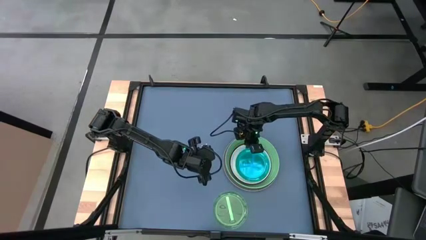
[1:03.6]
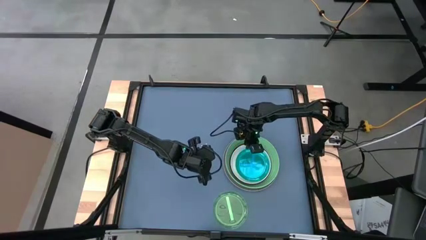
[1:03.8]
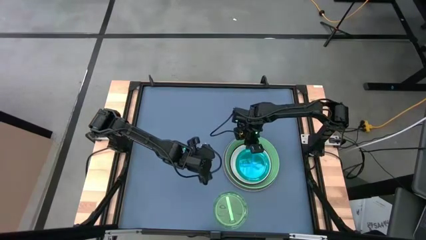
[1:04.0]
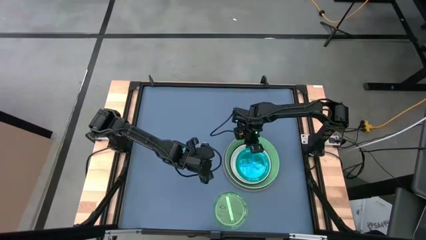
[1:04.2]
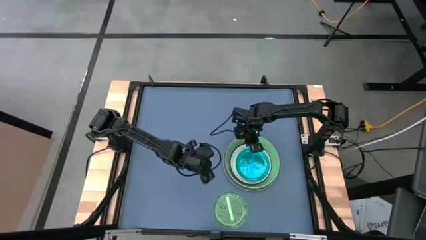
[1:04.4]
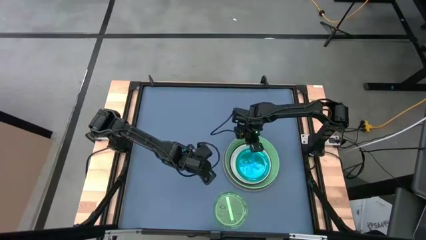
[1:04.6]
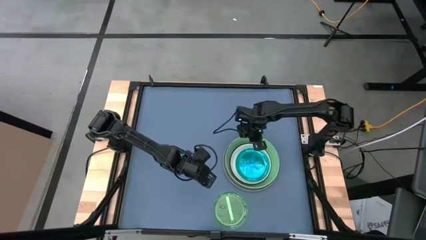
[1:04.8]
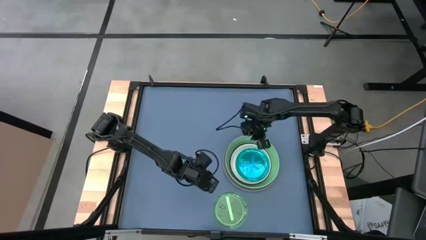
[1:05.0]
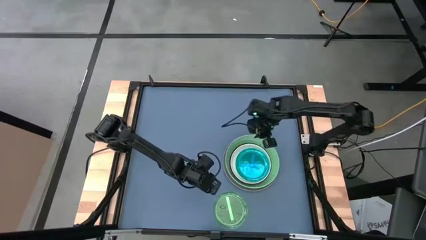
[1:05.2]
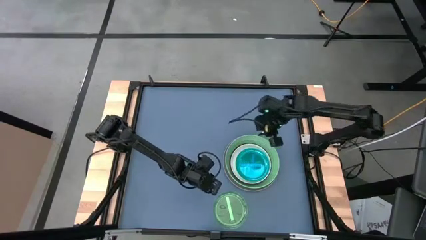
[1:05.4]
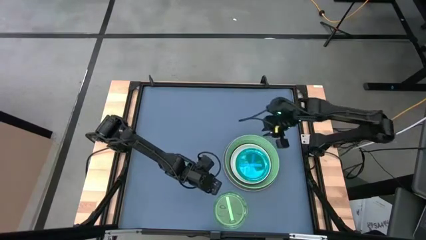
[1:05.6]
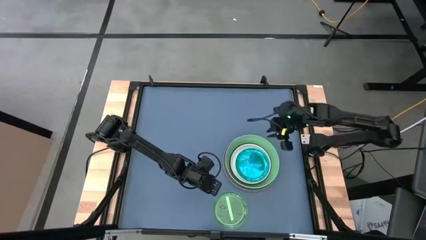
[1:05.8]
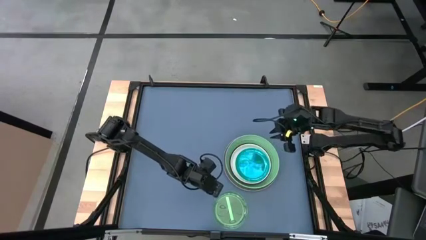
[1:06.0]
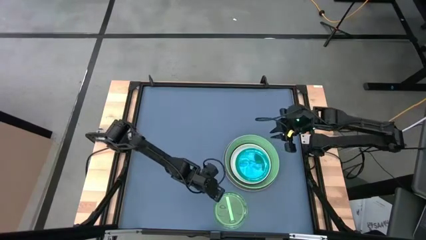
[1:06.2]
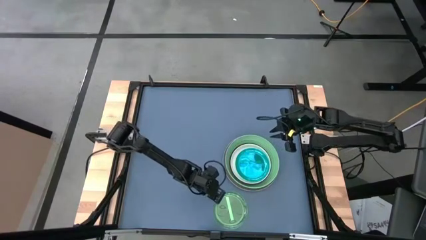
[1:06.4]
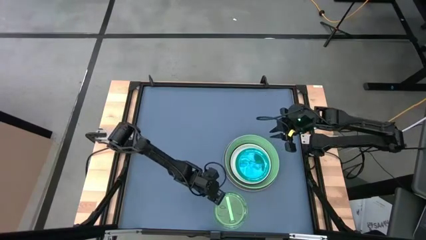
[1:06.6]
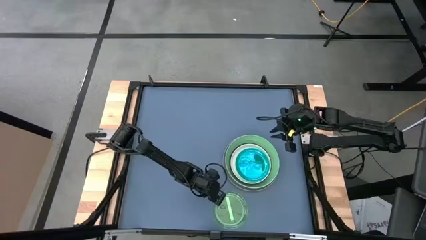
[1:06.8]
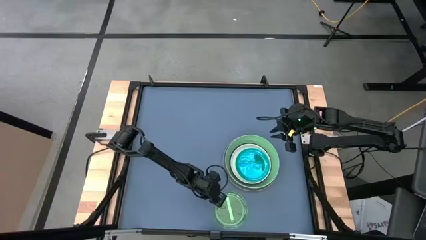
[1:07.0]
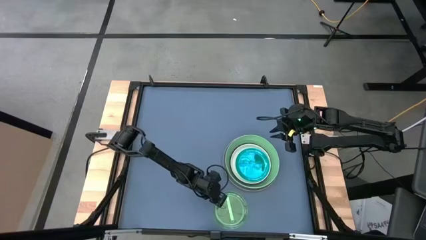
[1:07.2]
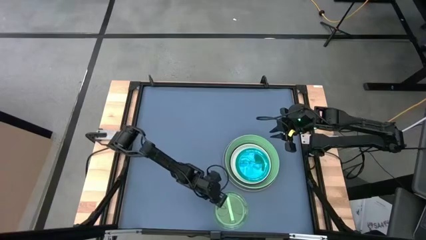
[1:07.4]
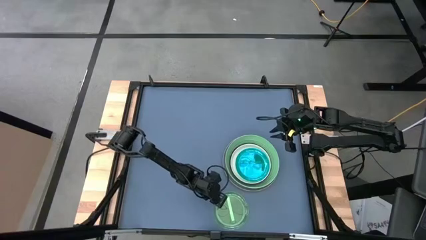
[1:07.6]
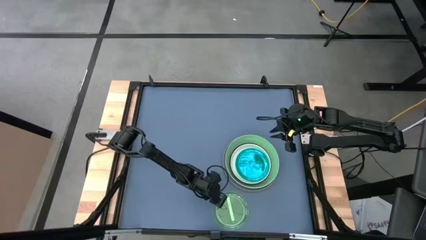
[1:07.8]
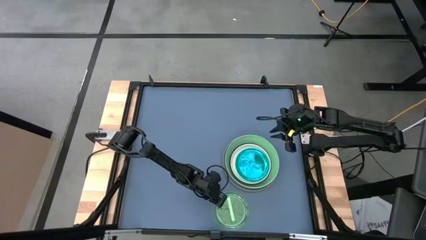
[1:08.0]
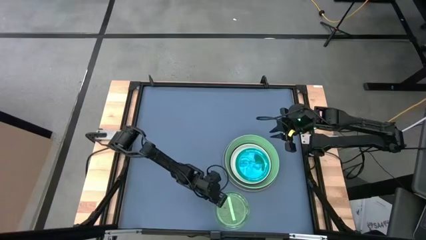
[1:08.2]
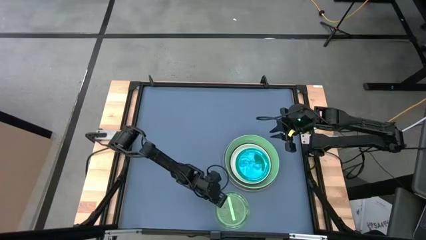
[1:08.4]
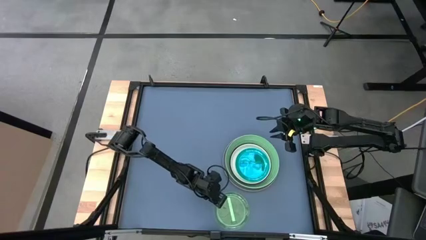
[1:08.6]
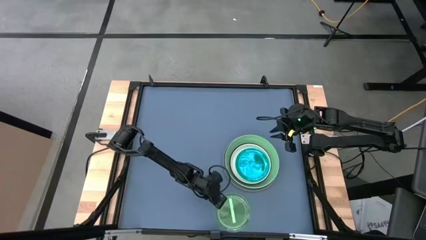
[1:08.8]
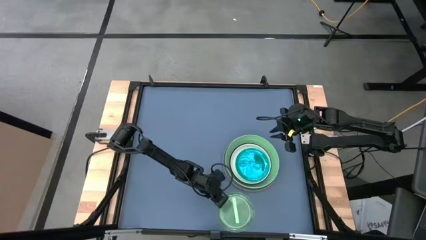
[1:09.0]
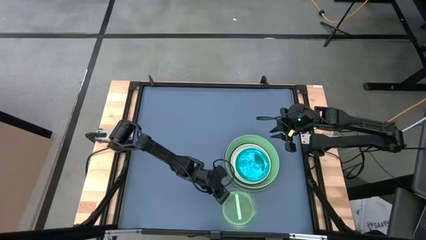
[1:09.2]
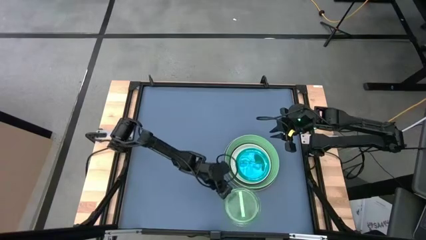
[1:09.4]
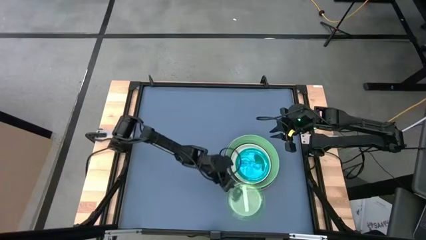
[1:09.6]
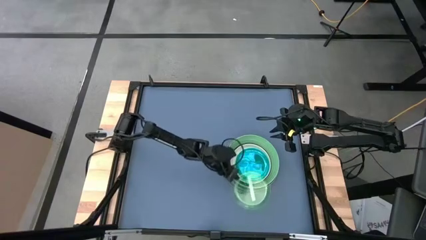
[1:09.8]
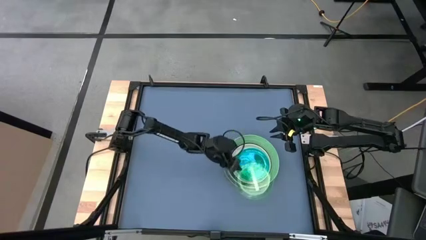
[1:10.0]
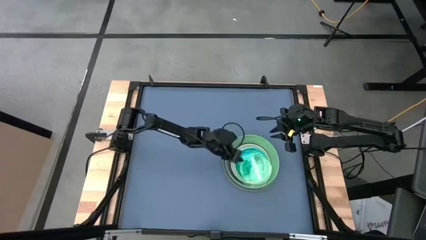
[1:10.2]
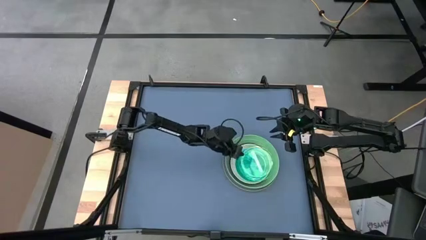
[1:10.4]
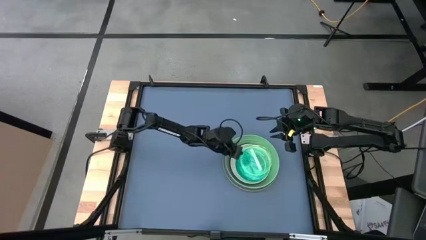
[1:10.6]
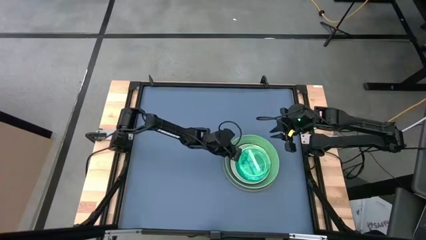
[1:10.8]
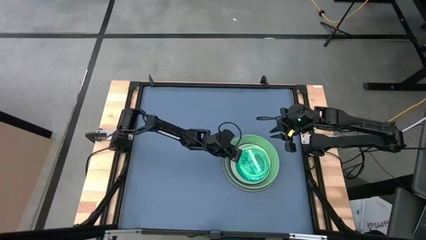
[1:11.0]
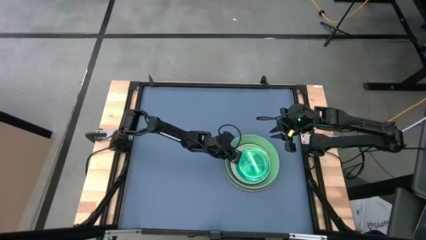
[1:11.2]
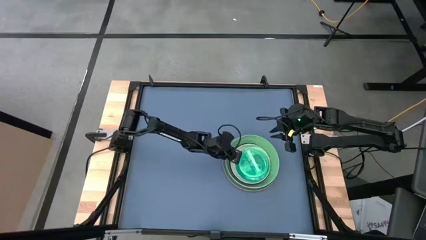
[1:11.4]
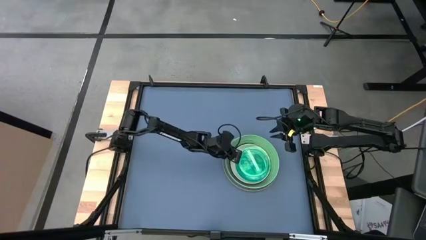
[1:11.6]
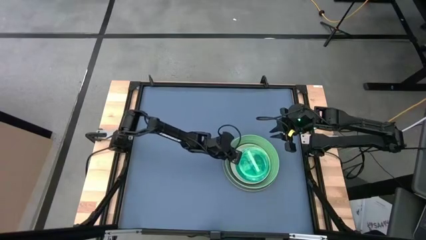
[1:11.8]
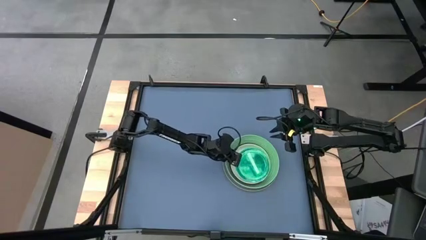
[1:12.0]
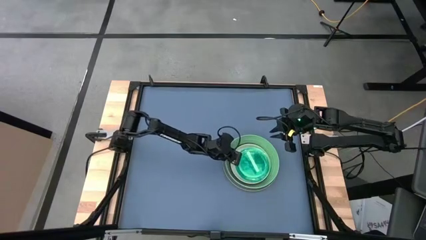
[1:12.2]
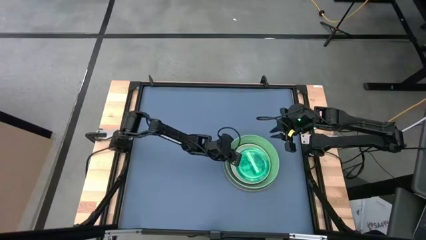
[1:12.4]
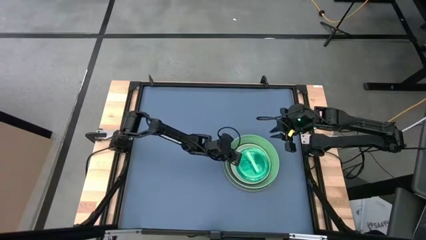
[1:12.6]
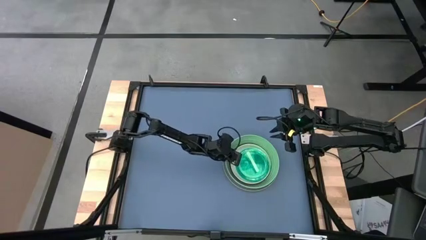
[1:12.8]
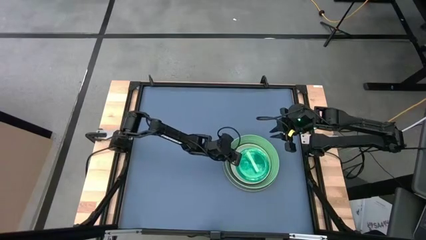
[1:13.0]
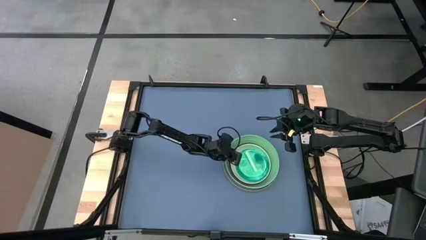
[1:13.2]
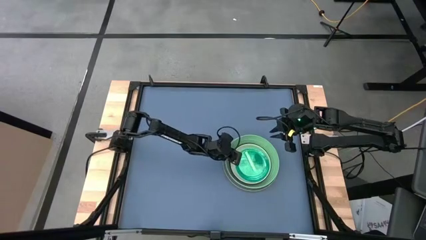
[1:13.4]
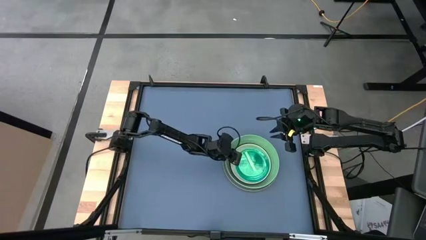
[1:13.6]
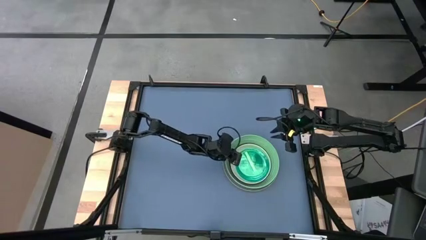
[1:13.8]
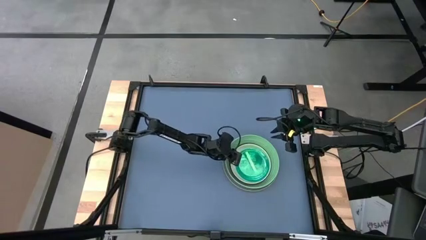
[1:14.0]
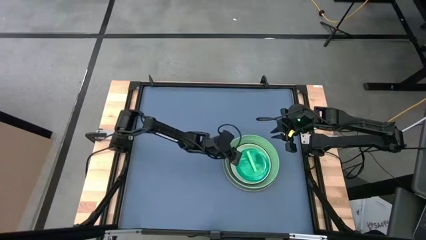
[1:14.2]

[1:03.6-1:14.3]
Task: Stack plastic plates
Stack the green plate on top of the blue plate
